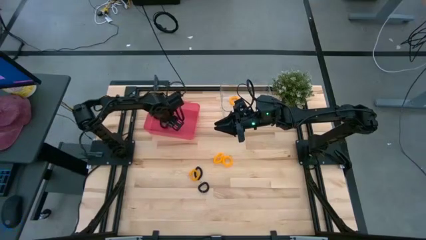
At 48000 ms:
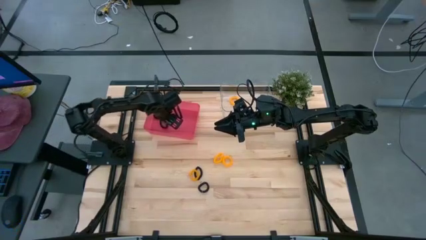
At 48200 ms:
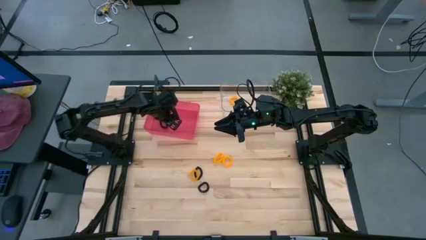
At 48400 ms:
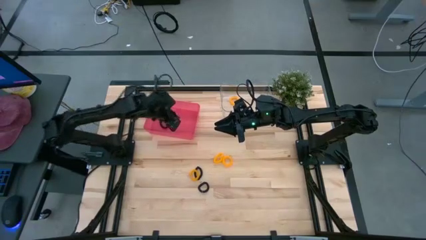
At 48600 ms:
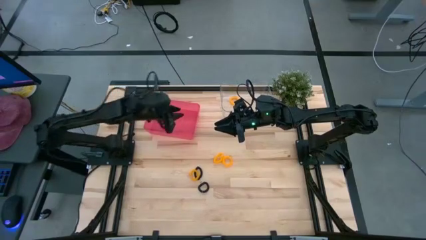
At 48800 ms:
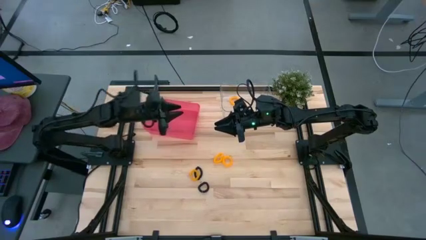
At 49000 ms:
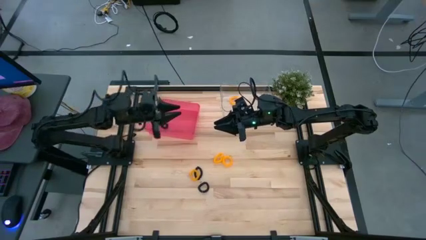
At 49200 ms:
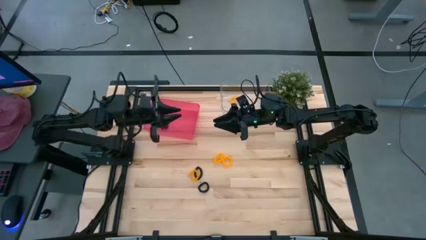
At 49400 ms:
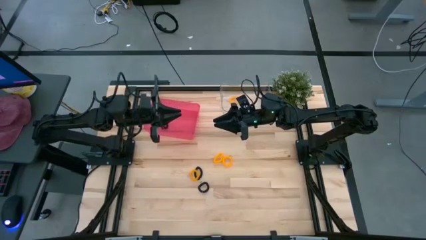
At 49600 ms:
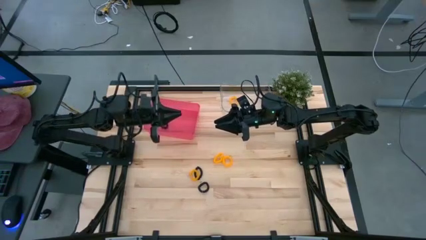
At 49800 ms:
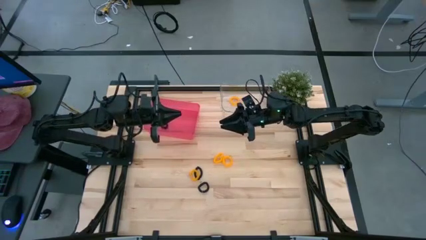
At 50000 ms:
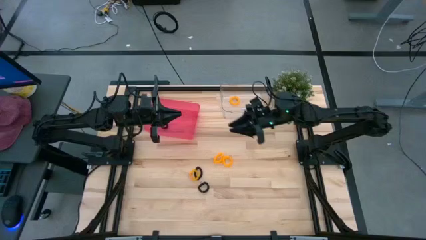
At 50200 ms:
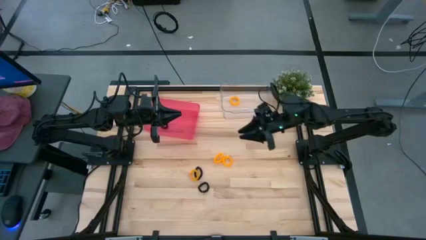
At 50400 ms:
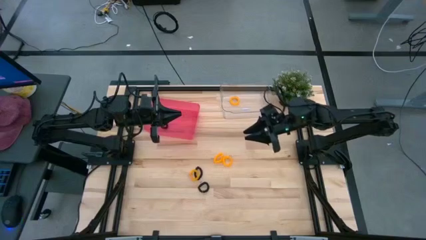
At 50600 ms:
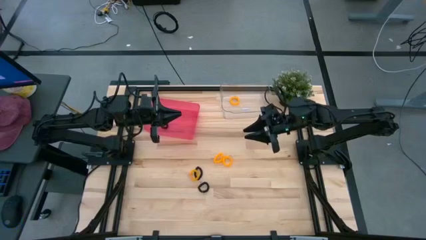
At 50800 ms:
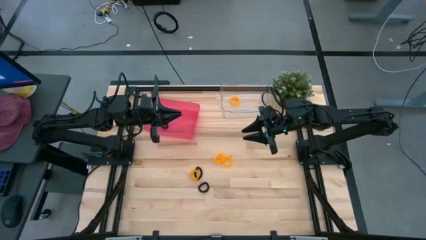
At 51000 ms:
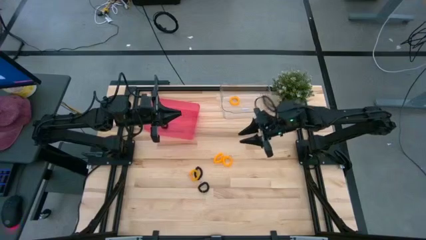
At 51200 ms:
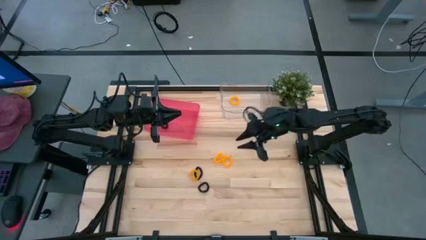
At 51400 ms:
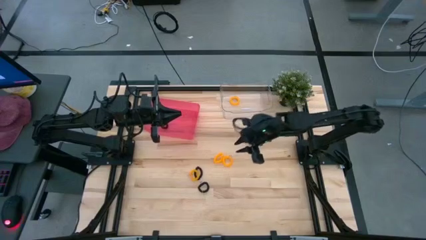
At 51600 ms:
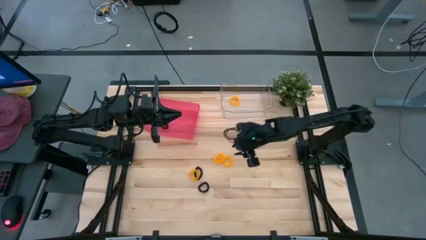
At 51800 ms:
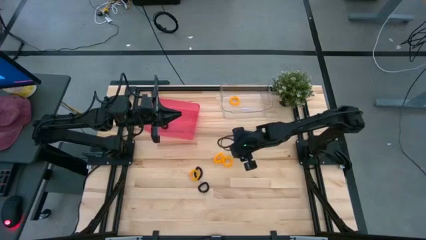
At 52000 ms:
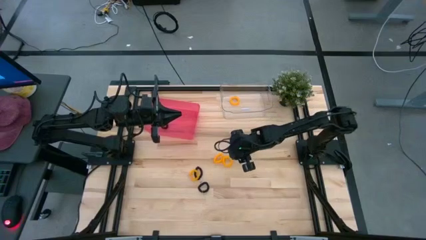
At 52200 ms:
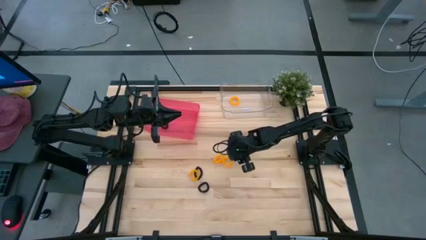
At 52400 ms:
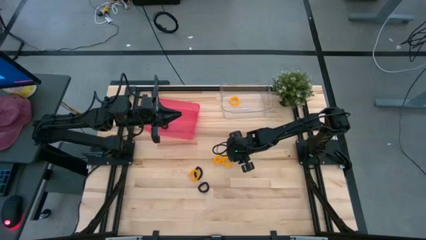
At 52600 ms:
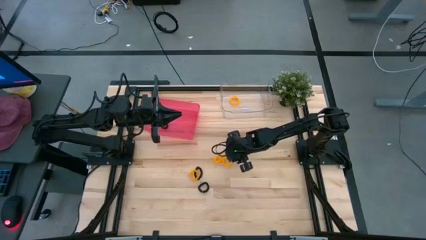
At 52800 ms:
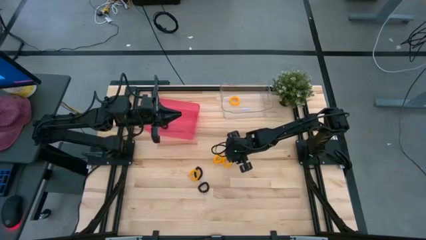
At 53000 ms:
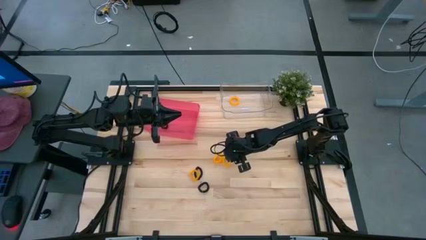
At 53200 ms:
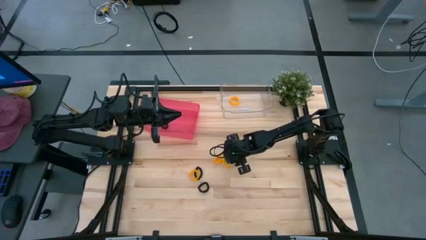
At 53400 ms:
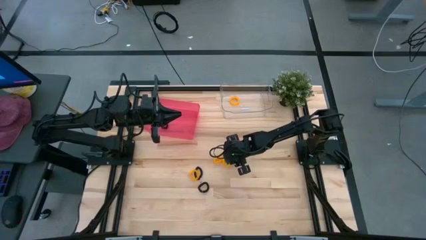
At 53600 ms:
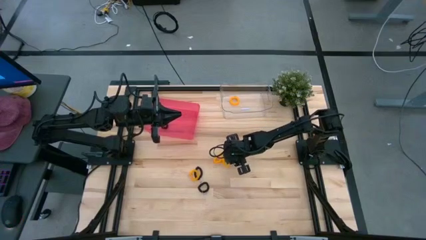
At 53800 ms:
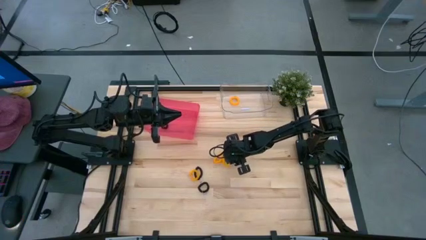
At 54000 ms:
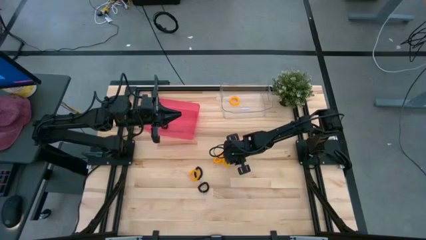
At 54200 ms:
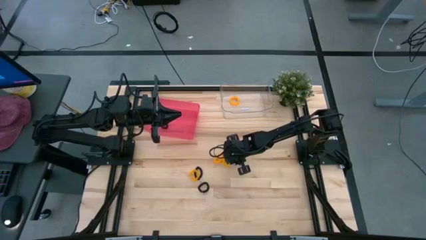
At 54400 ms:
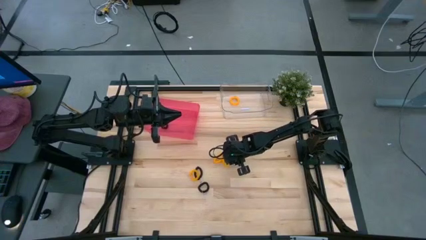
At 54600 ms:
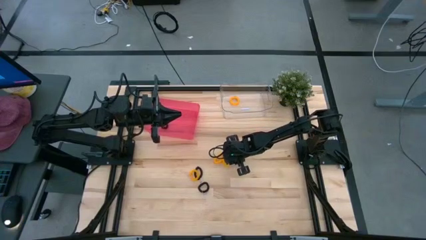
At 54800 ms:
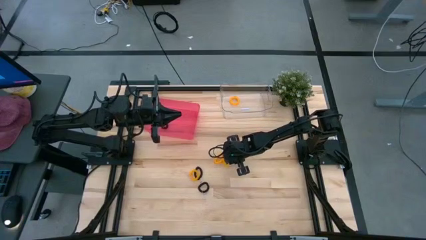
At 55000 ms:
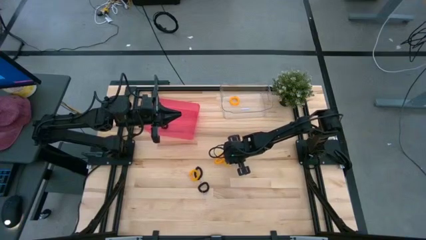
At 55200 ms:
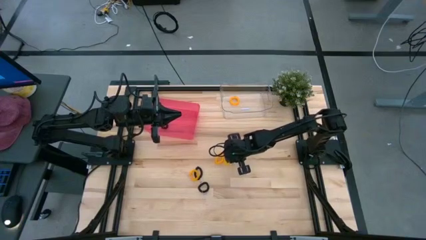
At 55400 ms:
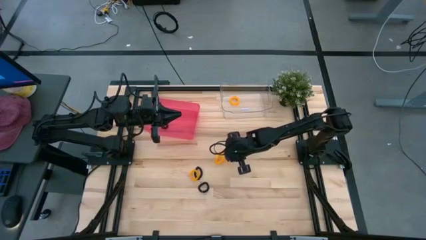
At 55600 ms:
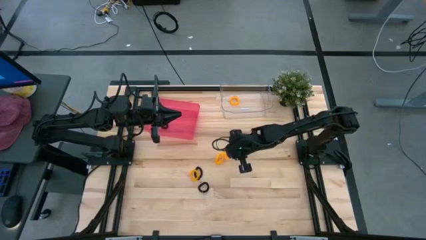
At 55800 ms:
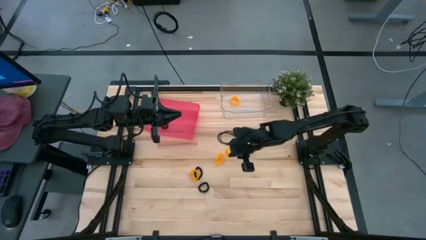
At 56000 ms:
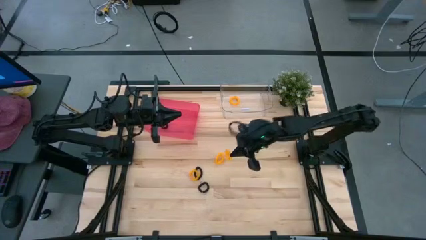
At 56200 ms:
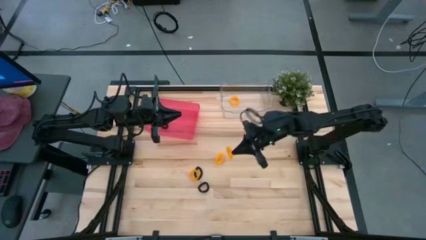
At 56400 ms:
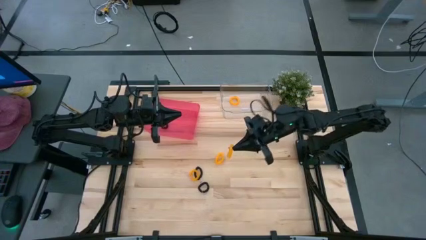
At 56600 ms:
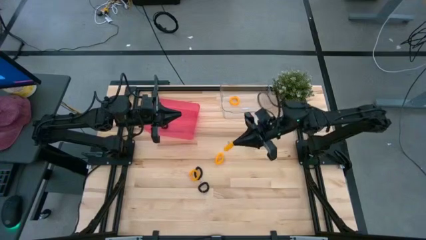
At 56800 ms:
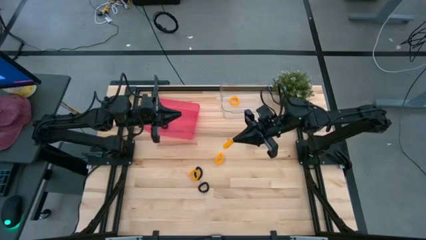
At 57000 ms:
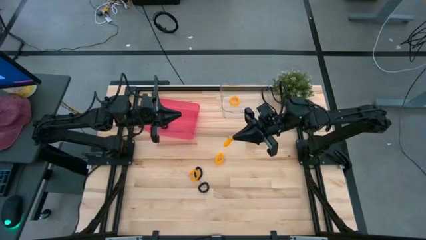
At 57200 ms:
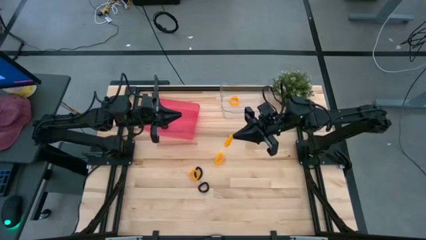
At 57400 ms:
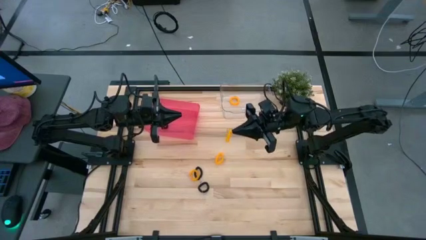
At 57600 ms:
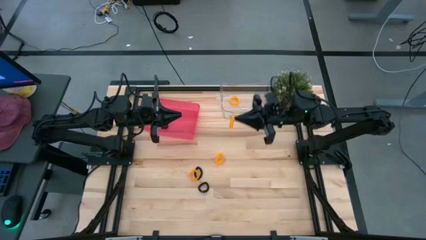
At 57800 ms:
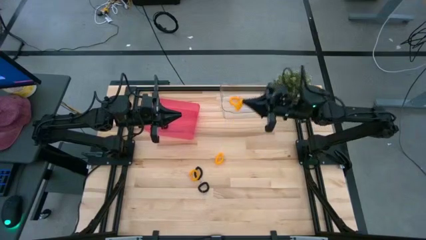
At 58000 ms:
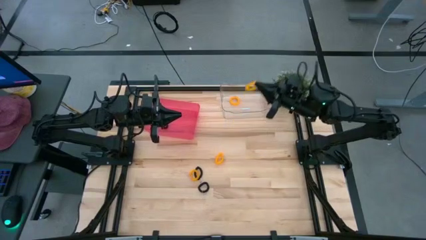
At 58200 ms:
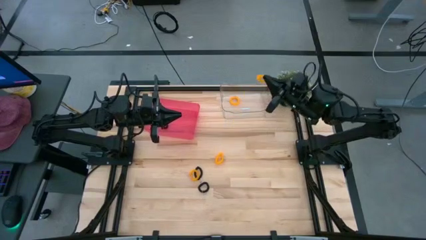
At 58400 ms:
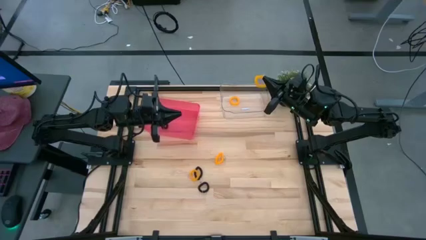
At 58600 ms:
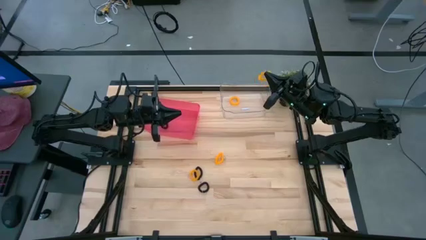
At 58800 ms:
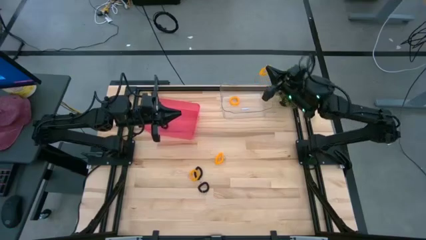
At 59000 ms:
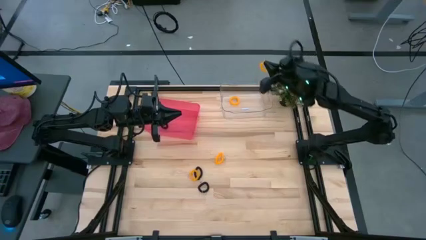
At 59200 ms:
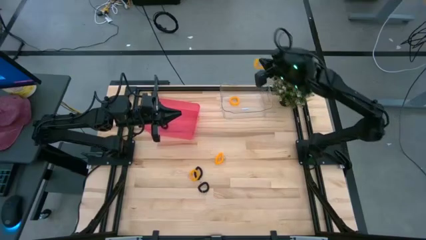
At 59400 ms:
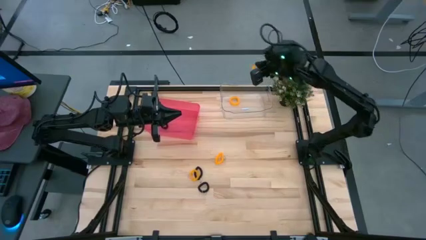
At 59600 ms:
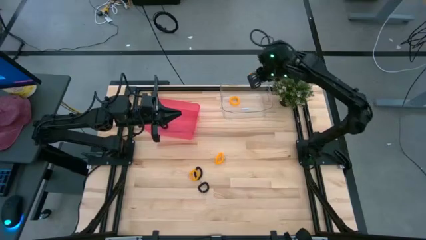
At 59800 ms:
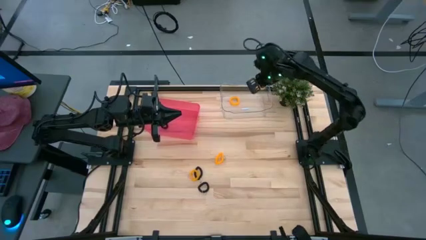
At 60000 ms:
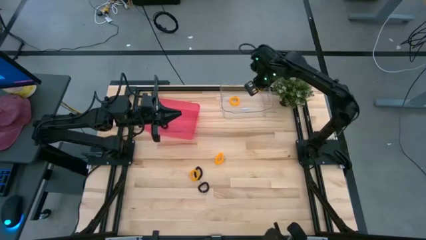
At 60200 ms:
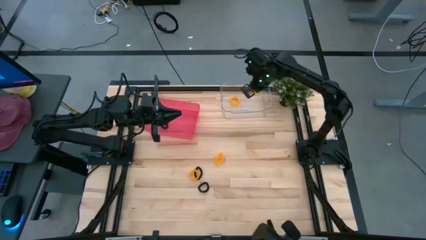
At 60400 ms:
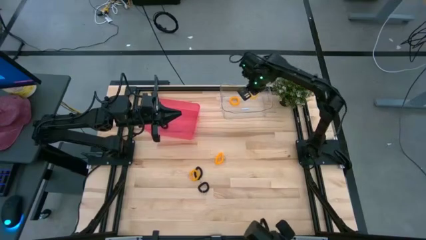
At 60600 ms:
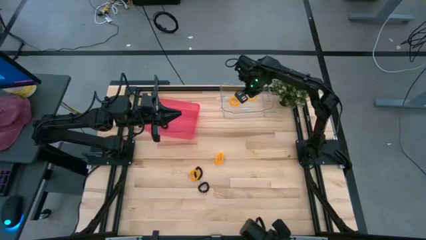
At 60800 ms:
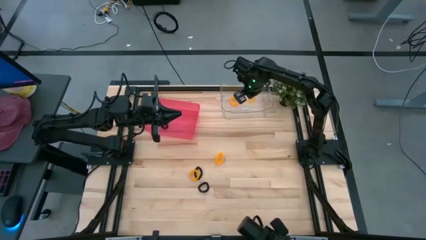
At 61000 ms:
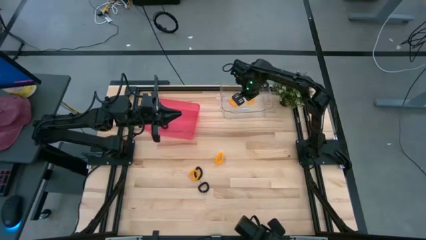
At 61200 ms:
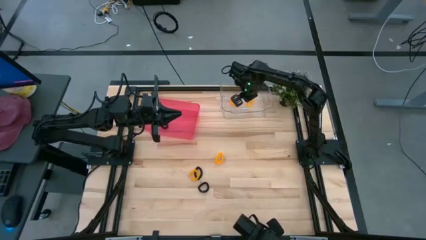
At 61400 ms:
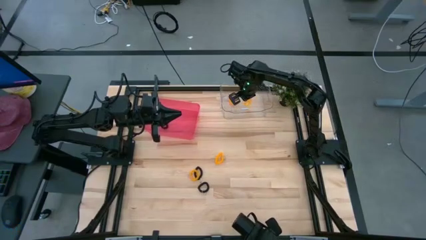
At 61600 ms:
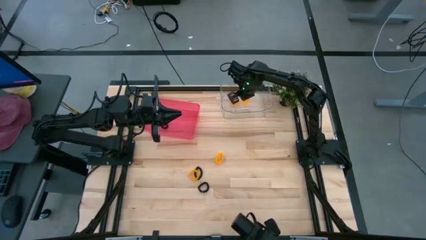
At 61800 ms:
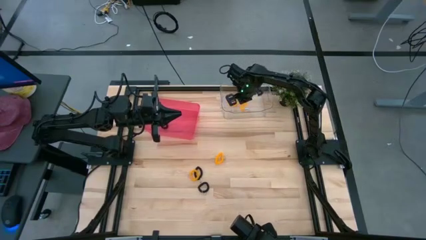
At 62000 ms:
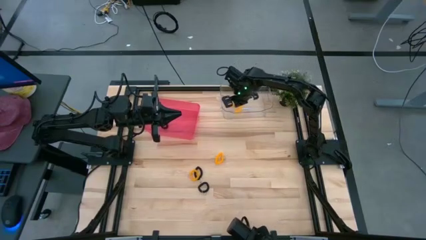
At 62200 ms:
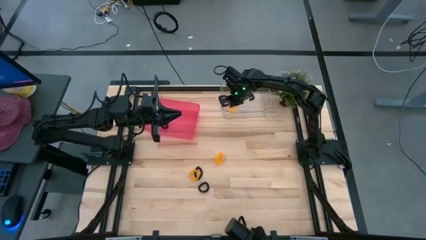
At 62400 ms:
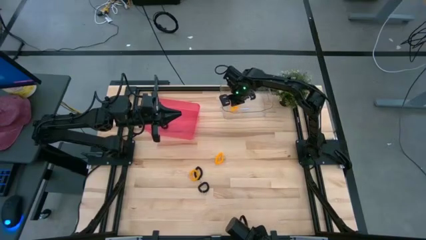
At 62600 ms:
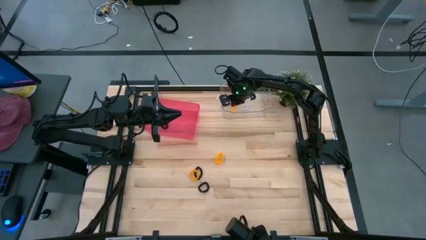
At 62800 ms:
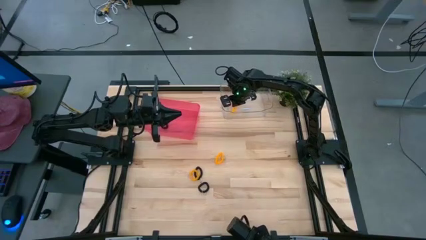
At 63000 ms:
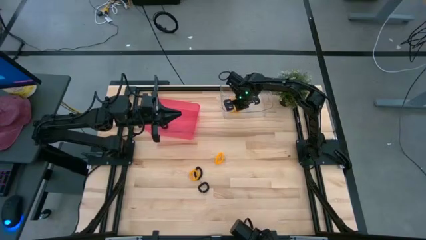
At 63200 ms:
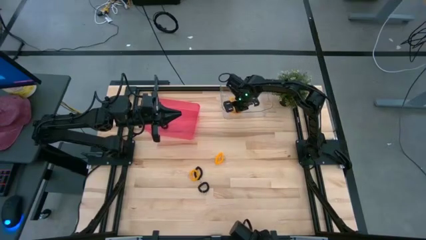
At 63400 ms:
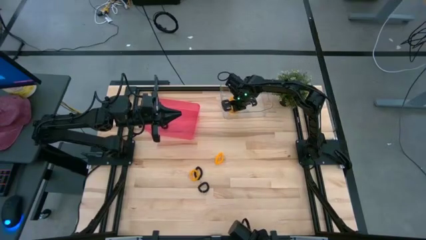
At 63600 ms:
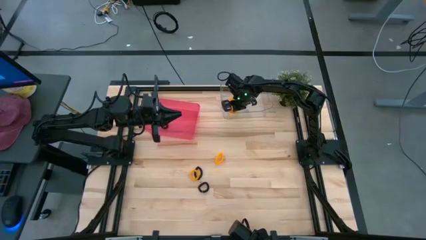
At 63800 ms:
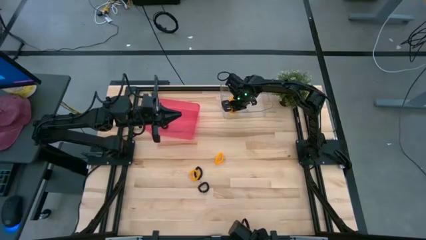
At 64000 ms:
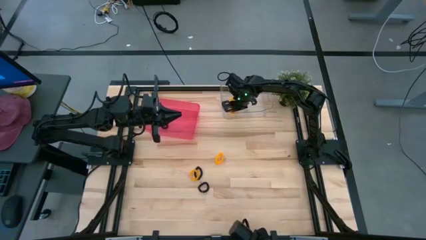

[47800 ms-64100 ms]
Task: Sort spring keychains
Put the yellow spring keychain into the transparent bin
